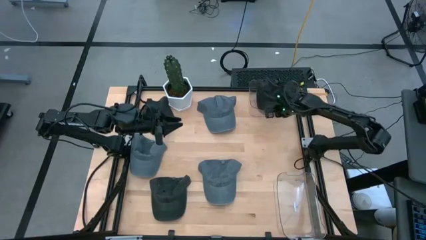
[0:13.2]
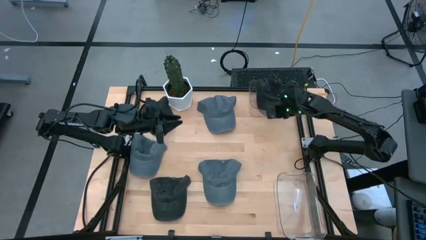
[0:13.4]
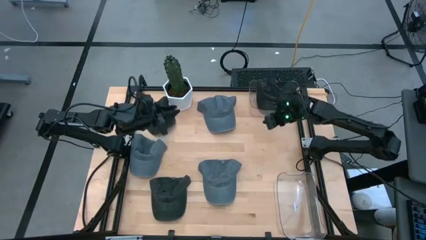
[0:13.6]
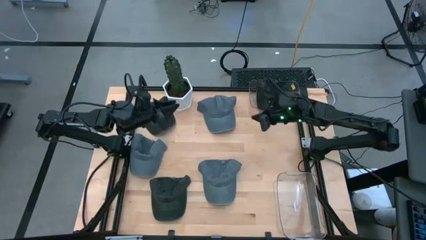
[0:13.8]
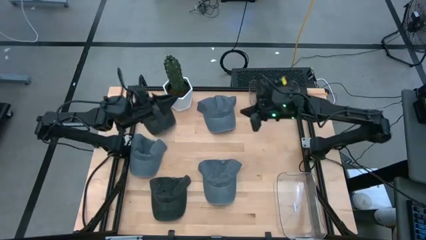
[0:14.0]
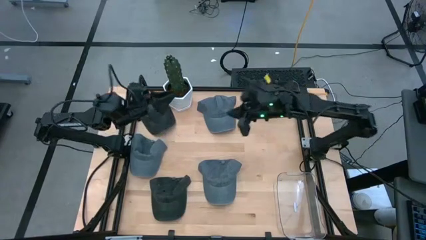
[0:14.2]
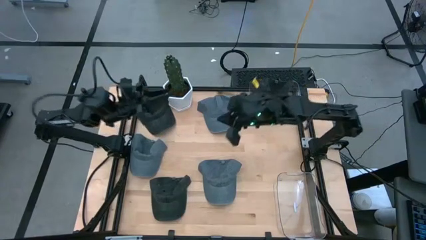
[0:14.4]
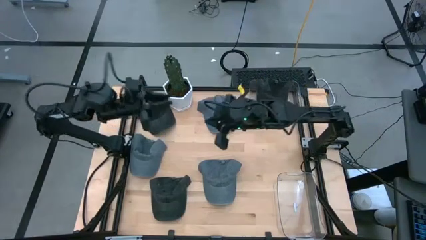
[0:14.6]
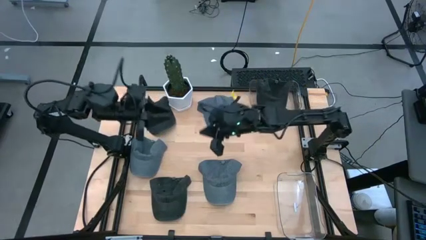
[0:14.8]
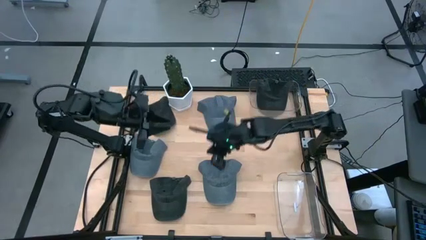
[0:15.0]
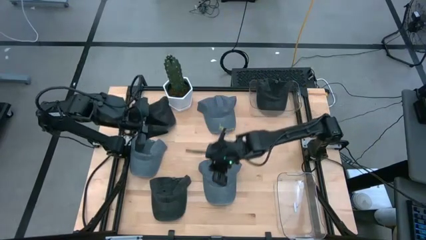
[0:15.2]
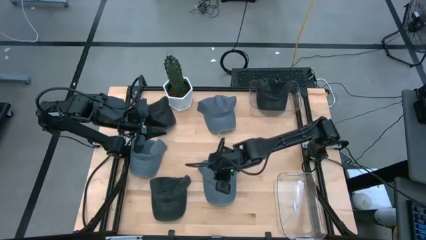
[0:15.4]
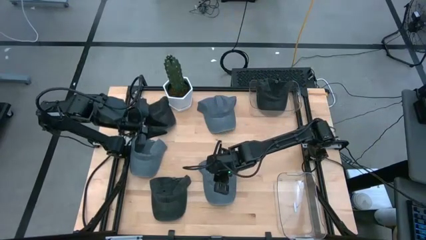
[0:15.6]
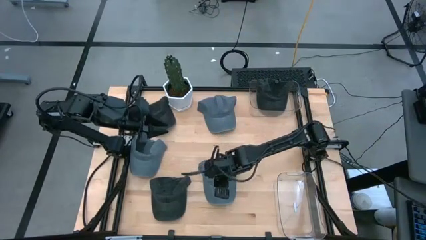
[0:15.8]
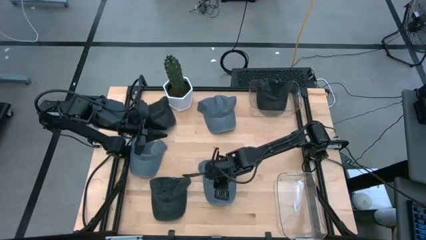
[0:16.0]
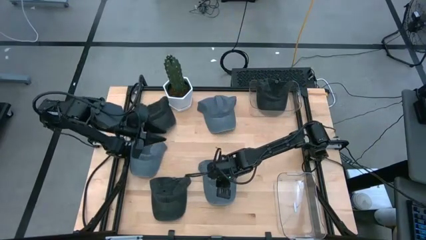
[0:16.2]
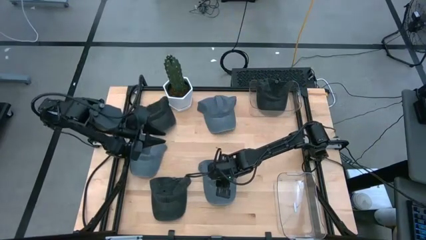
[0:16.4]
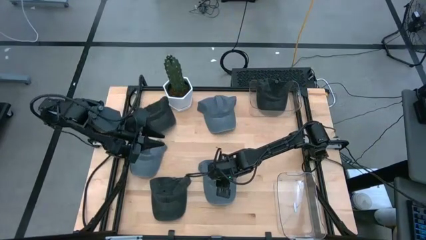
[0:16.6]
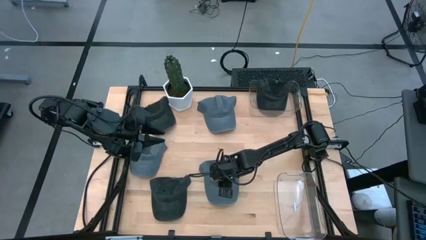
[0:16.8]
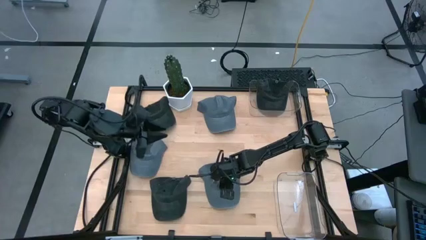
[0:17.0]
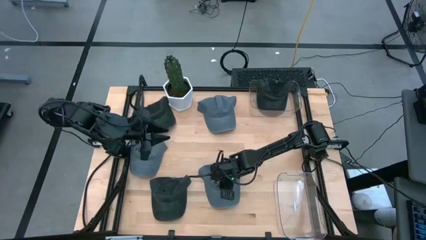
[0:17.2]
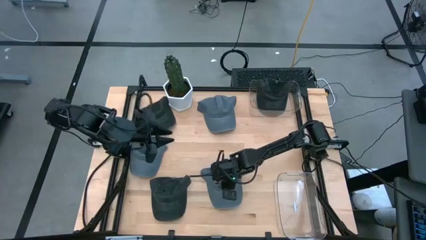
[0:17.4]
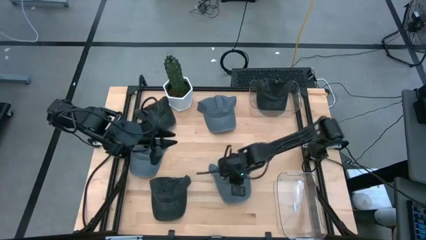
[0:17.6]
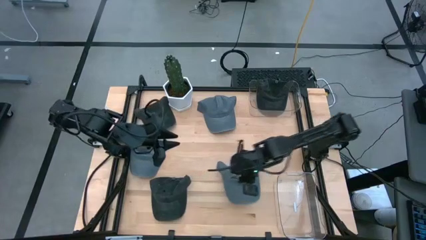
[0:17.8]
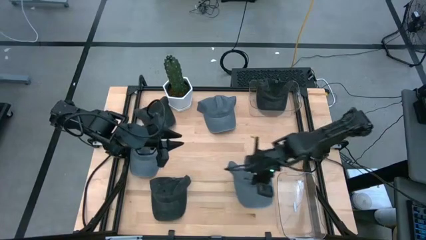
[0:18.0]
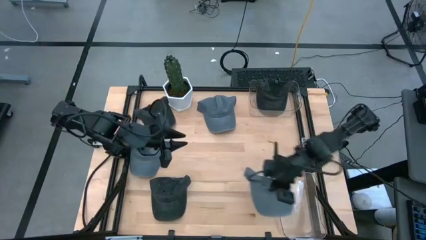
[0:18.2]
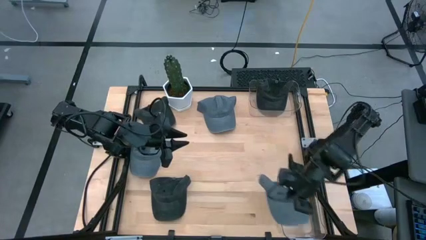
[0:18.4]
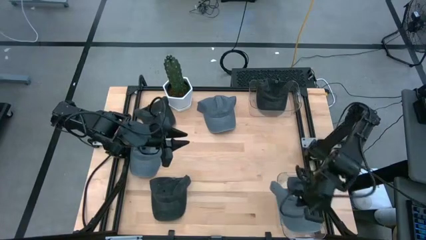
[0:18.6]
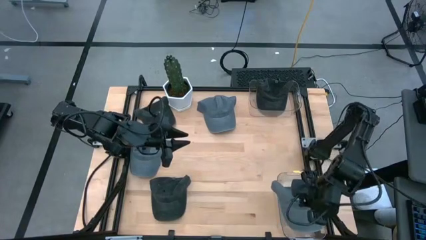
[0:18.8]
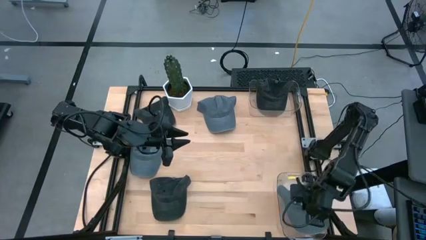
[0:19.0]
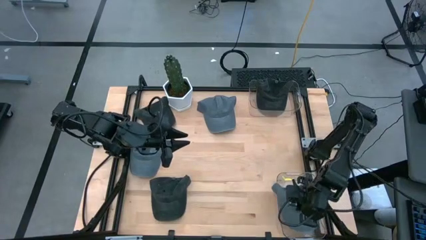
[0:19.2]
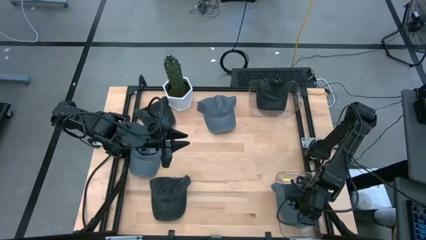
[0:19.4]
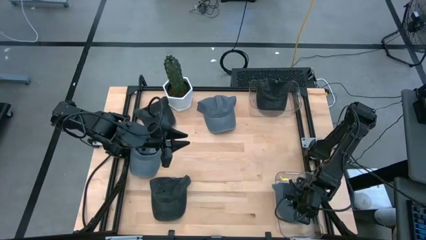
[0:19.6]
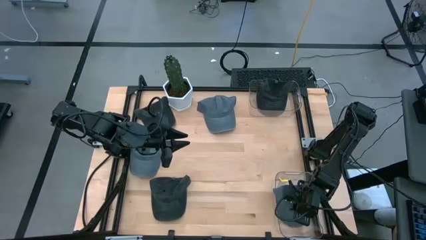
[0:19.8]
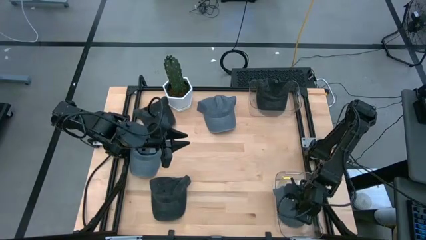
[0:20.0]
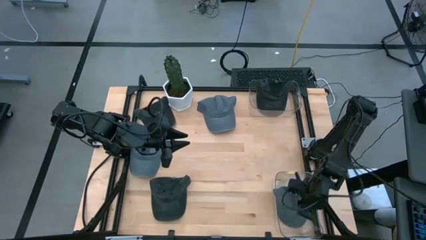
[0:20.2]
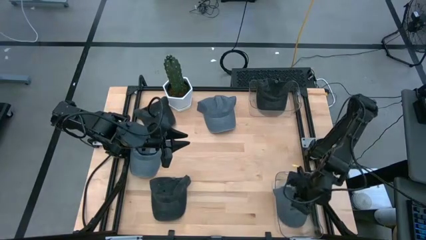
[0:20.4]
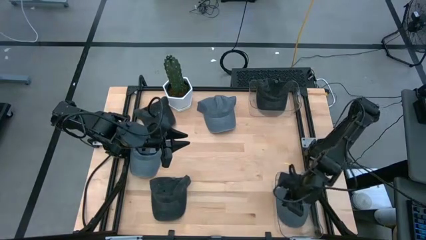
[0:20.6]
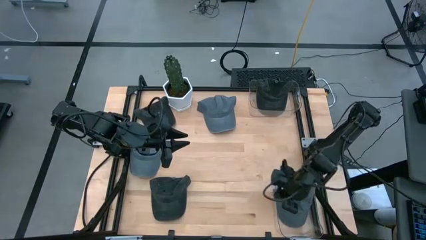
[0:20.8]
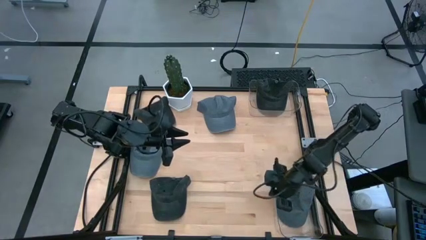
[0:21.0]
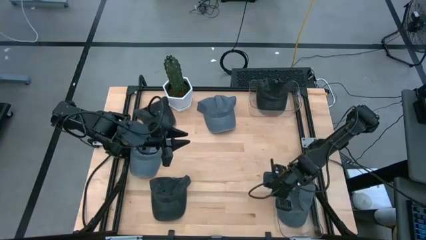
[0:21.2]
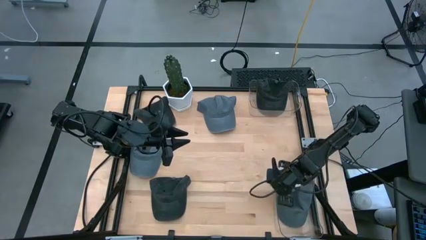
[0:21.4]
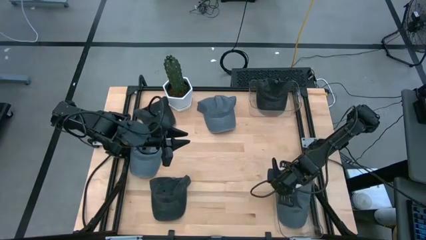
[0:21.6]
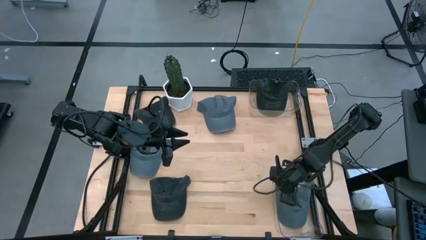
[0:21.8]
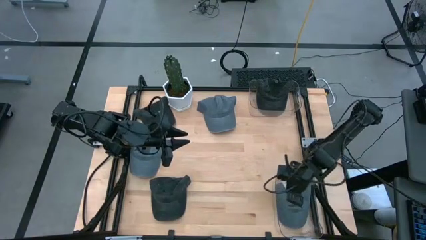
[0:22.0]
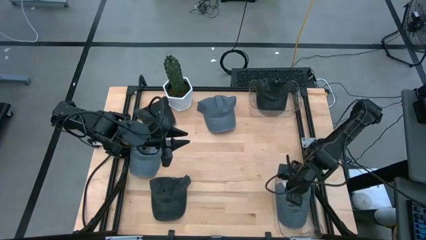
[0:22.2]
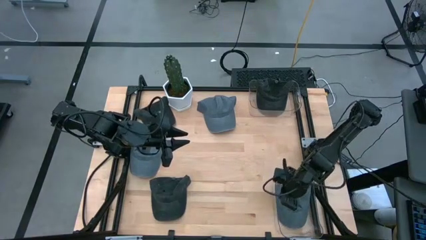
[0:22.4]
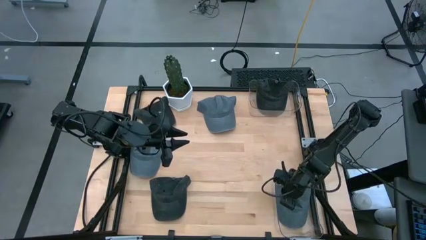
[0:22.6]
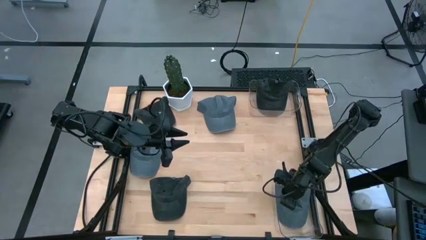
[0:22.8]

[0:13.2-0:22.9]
Task: Pick & Place hat
Put the bottom right gray cap into the bottom transparent bin

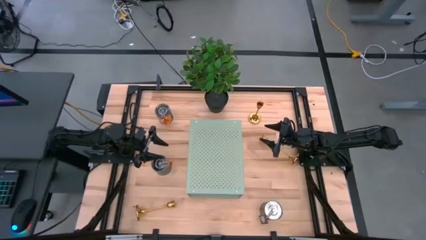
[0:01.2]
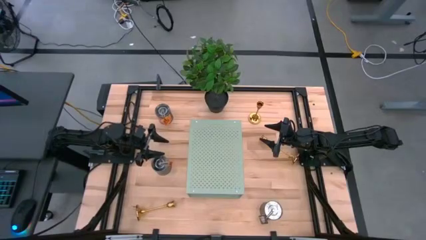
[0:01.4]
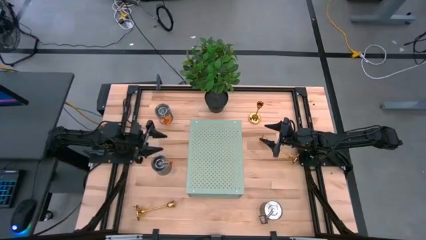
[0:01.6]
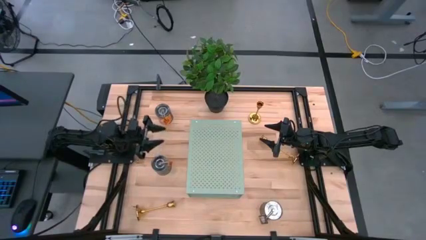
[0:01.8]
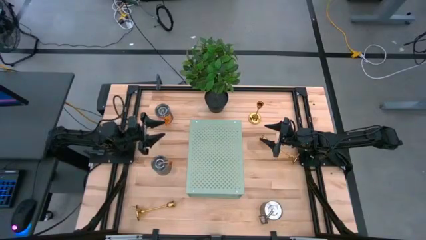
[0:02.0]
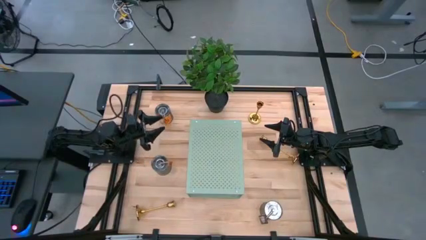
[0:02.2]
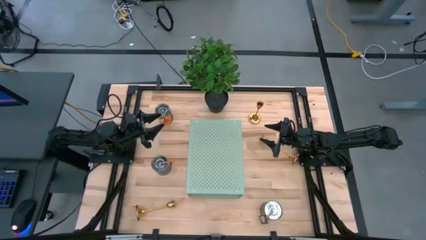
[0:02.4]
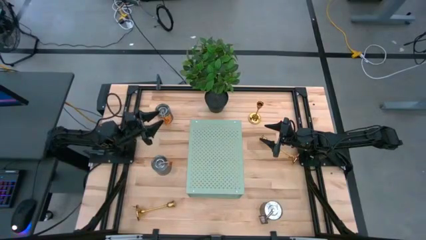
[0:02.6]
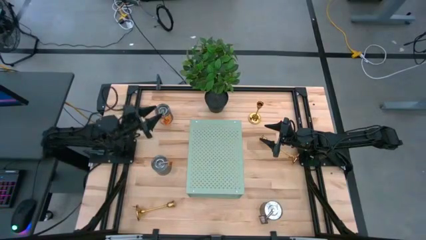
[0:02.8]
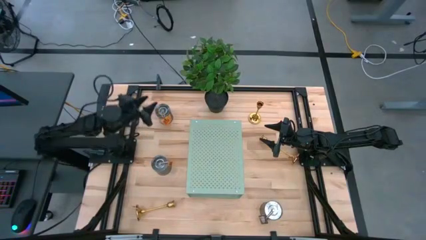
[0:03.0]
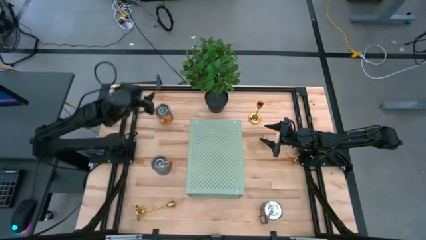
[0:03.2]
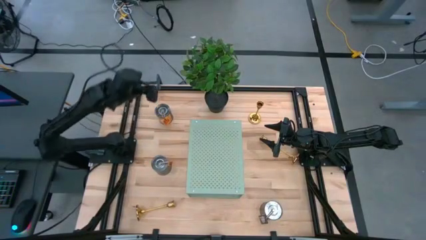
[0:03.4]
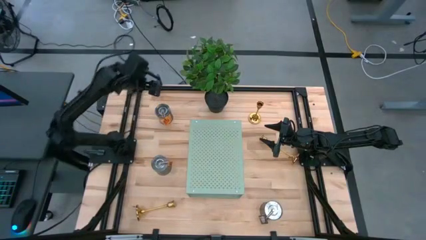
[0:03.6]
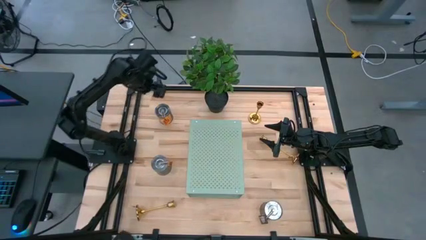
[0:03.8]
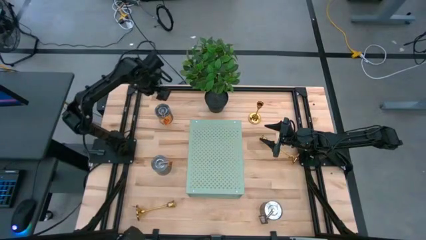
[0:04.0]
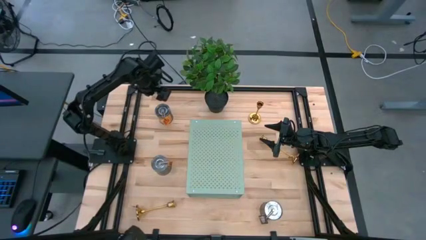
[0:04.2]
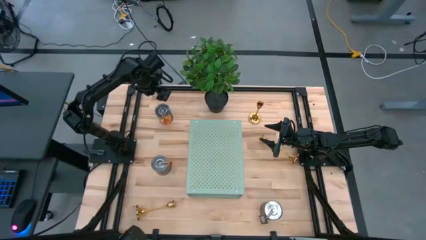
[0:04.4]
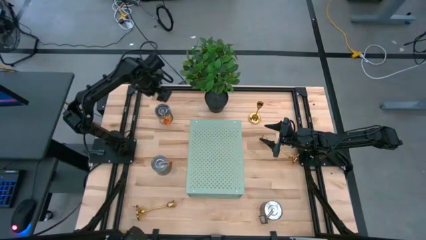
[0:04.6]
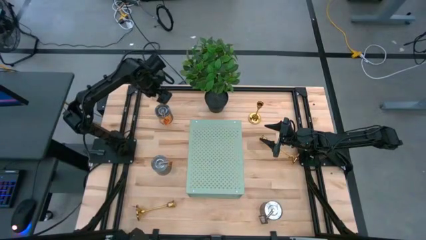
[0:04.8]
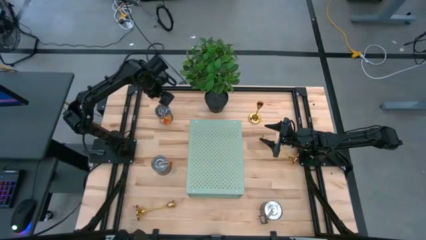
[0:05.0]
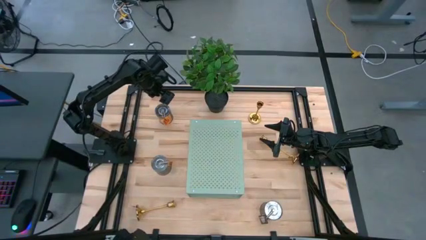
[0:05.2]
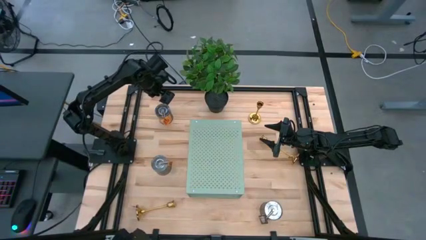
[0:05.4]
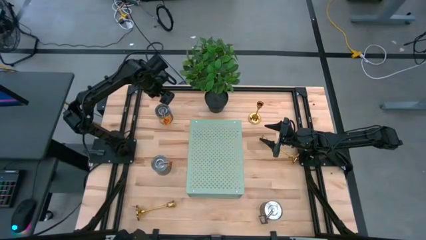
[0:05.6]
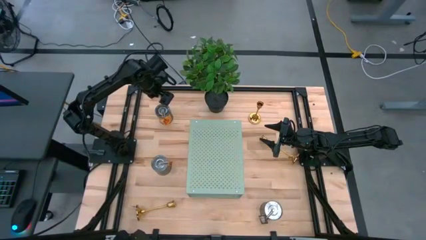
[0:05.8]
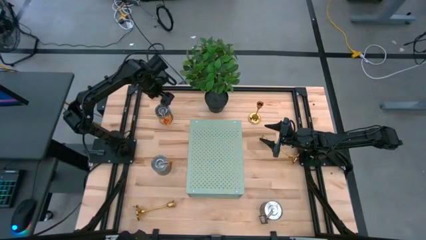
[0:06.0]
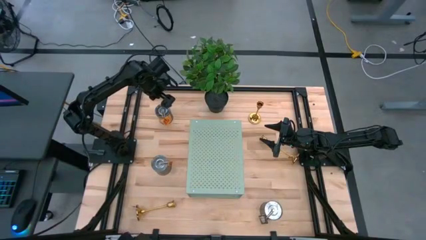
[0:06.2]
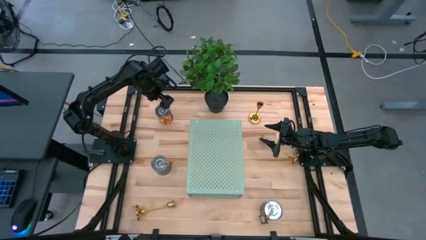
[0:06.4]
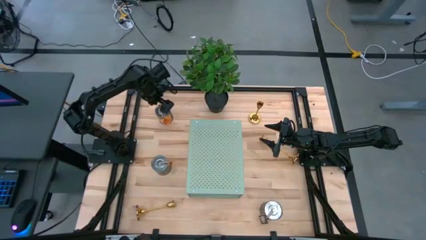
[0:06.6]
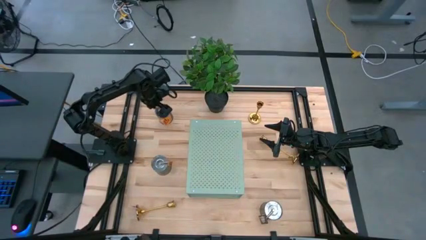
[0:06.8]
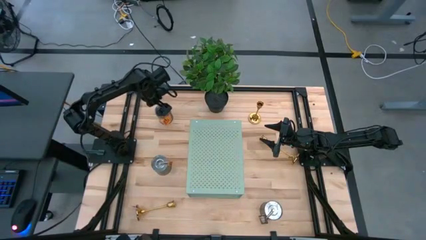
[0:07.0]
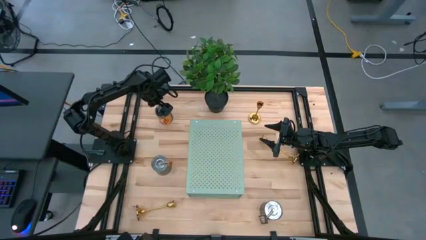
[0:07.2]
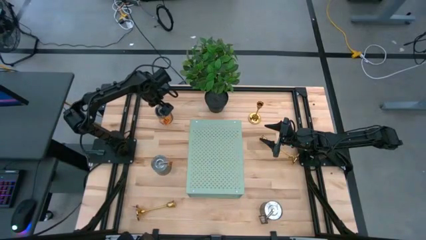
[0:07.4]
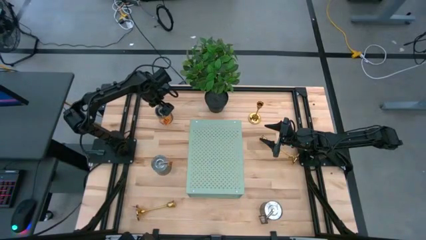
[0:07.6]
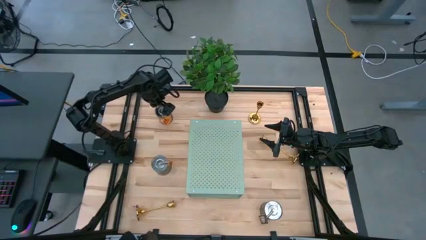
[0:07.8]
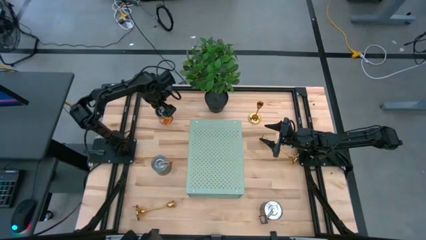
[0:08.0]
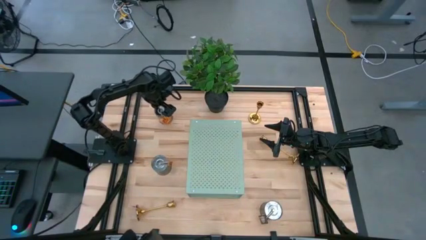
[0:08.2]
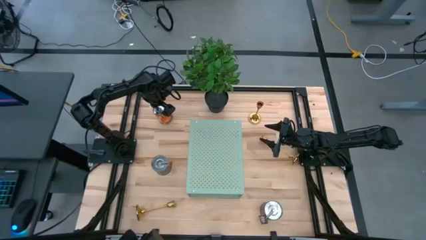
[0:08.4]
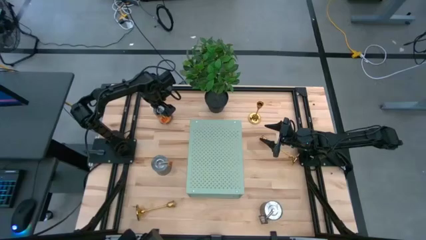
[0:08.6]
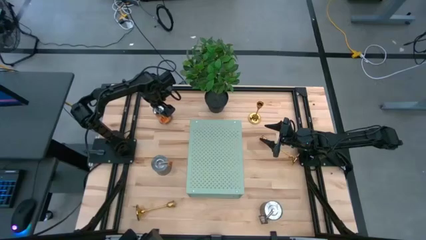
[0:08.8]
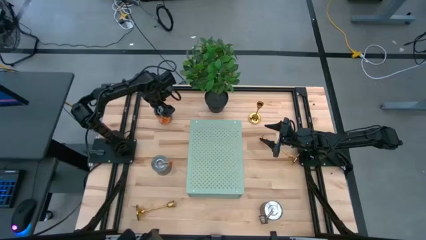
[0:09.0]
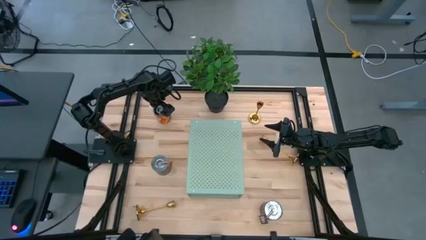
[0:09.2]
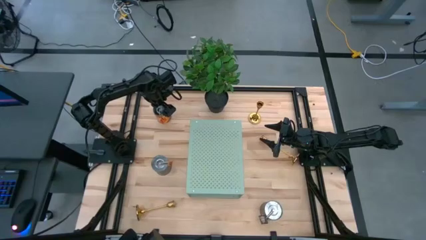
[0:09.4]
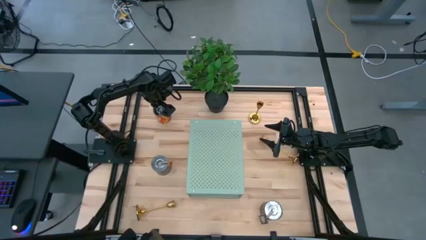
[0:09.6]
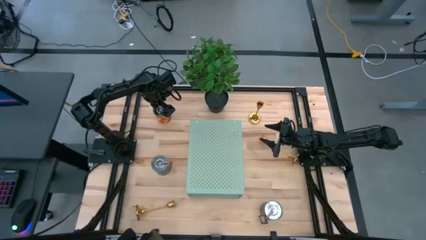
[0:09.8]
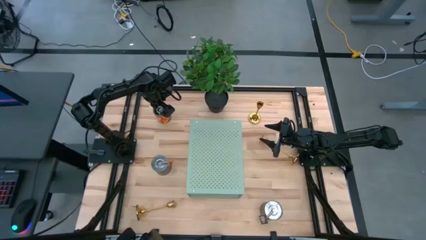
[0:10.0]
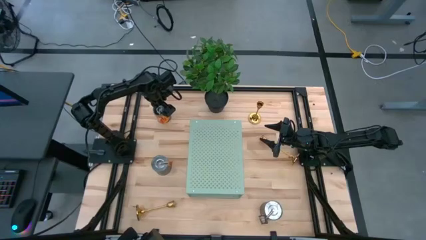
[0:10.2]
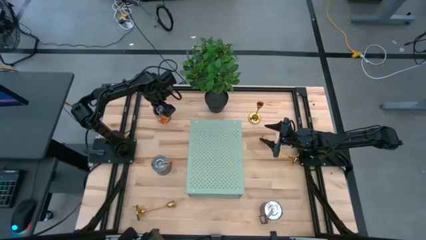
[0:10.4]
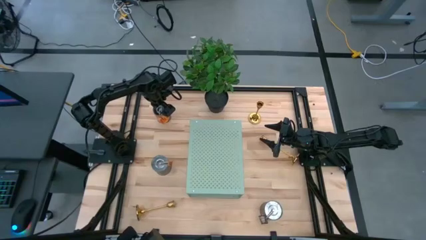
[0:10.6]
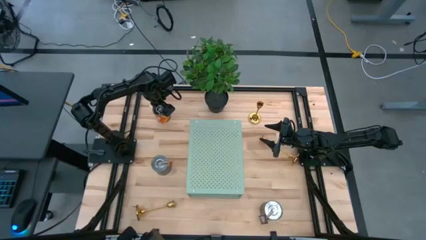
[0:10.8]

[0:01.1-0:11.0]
Task: Pick & Place candle stick holders
Put the top orange scented candle on the shelf
